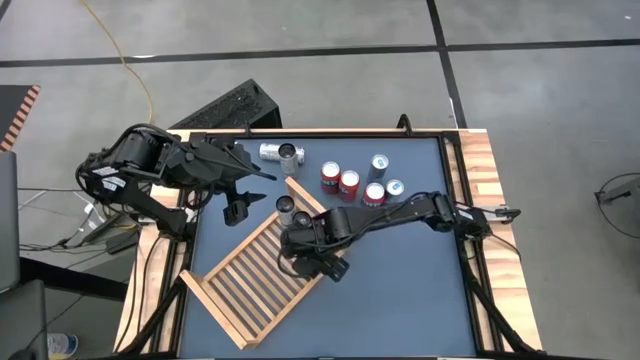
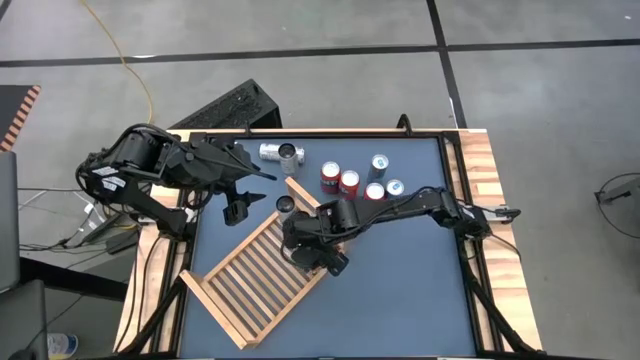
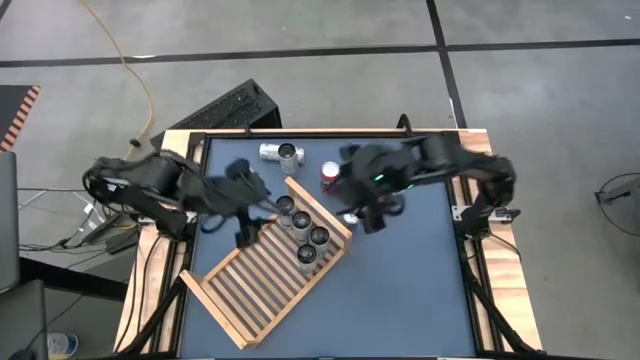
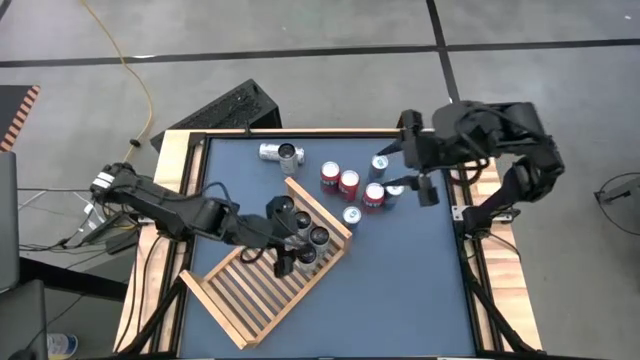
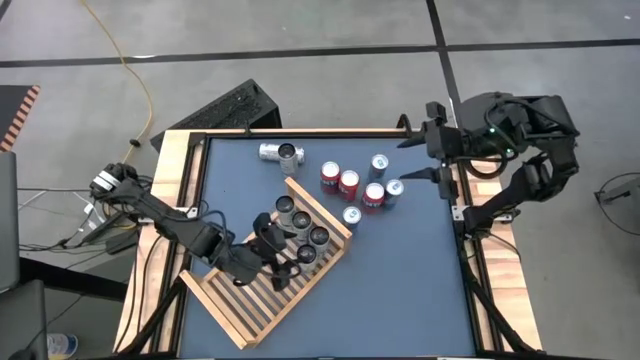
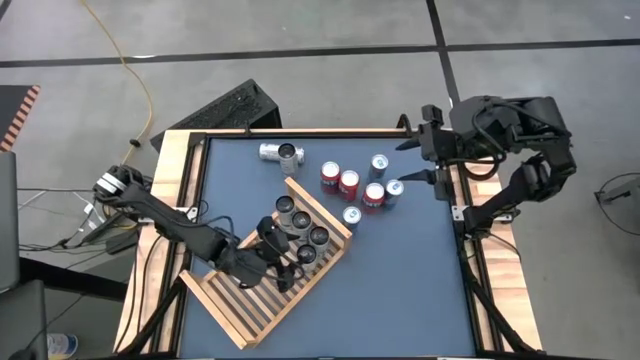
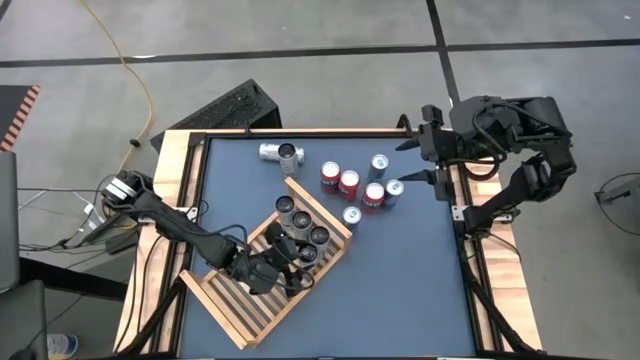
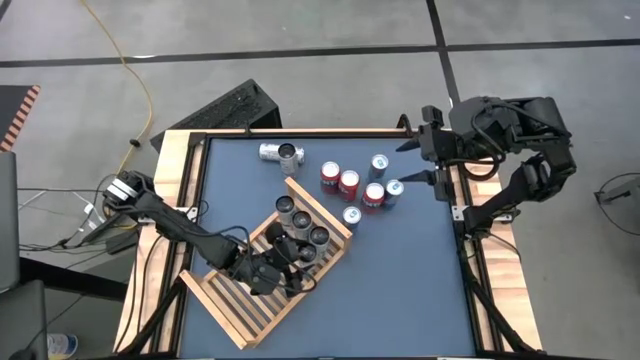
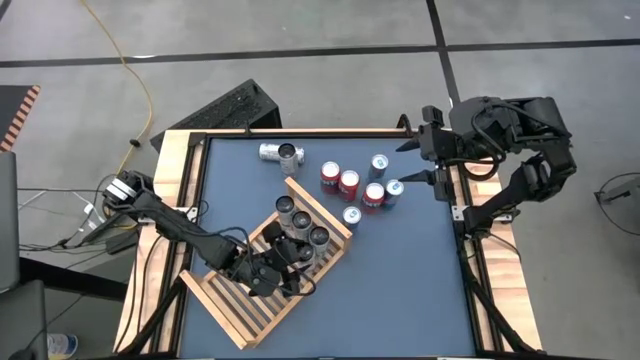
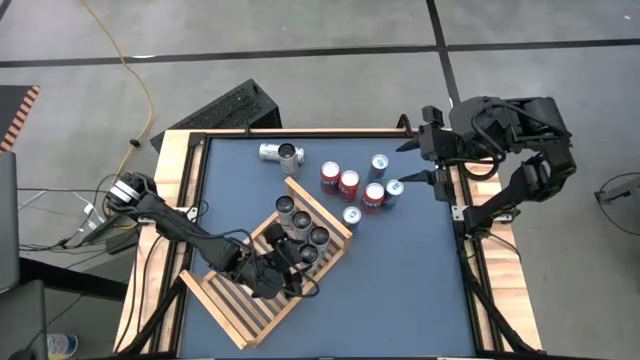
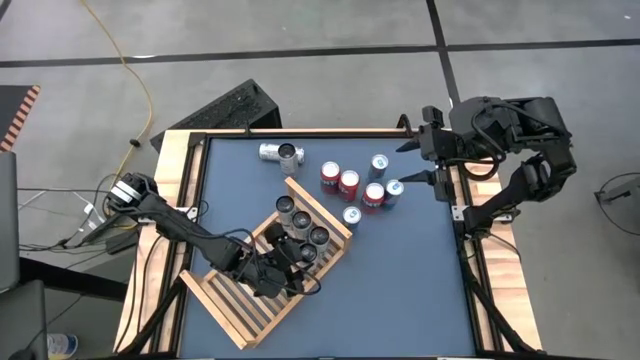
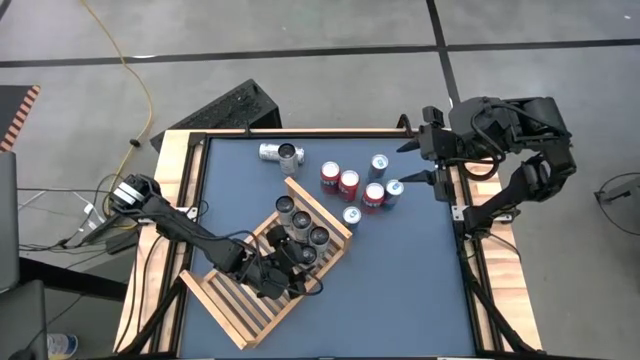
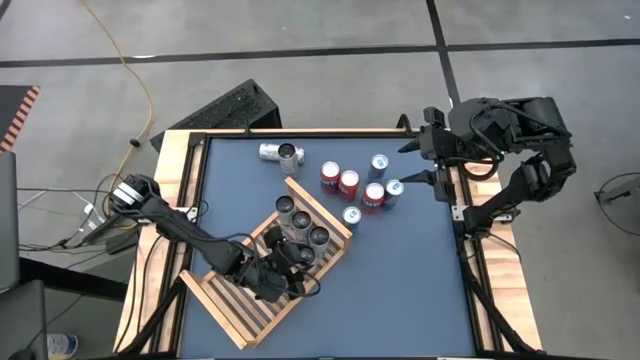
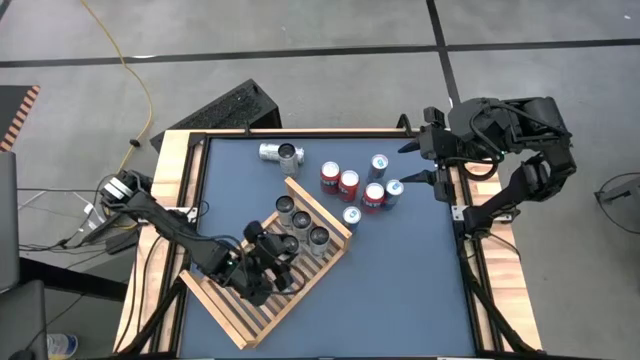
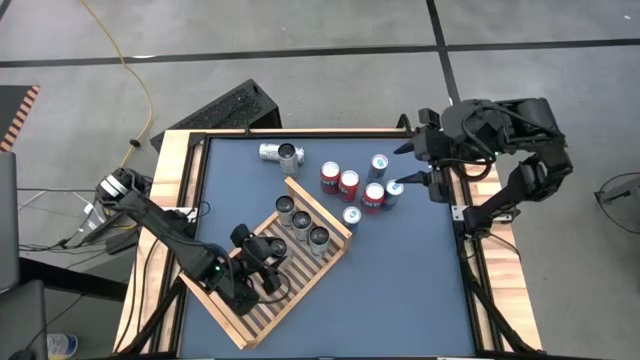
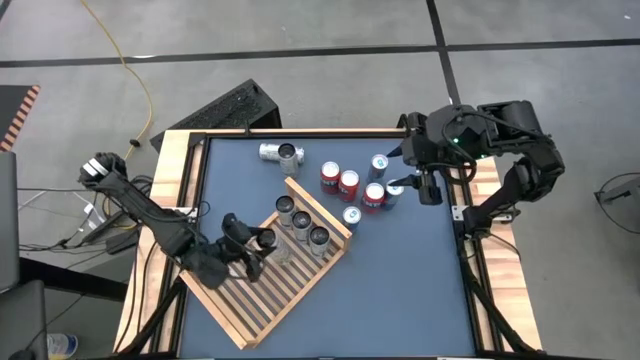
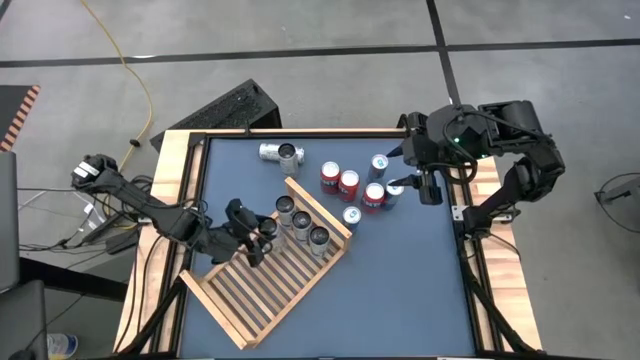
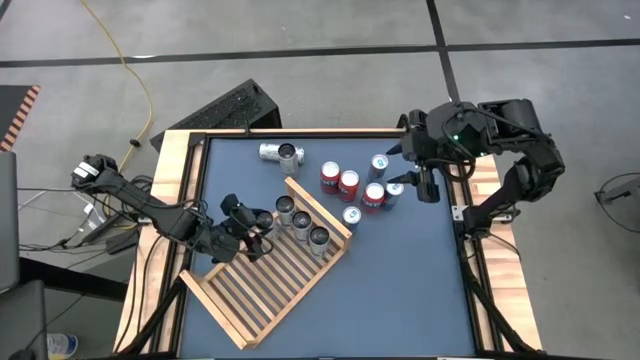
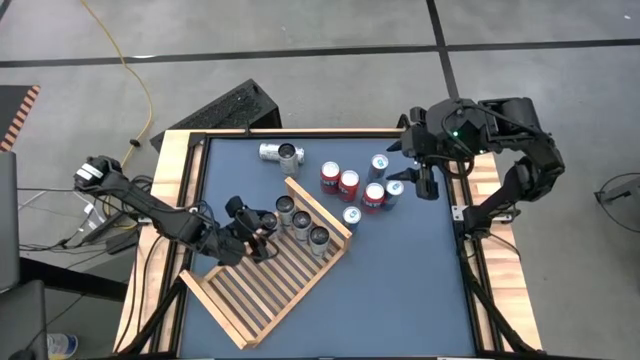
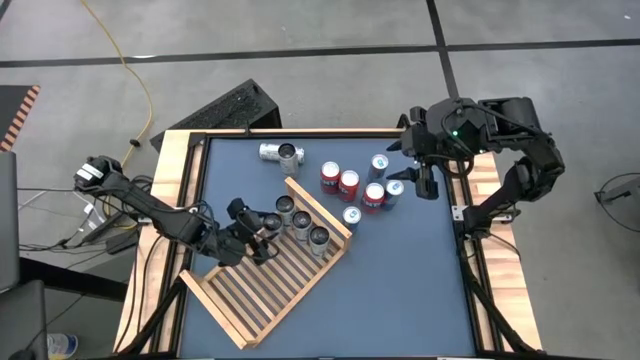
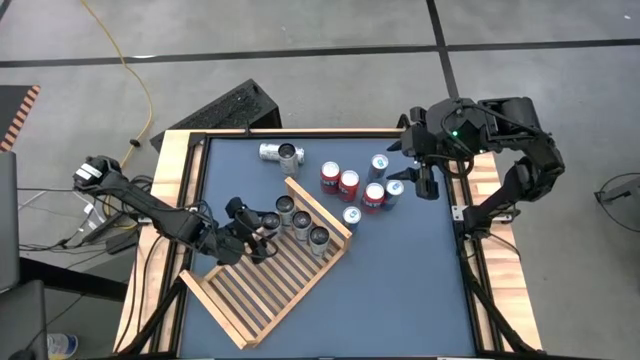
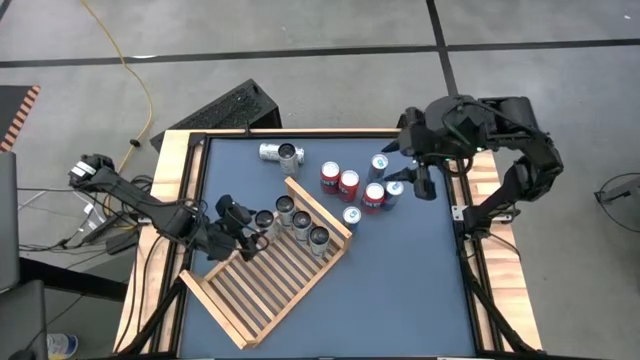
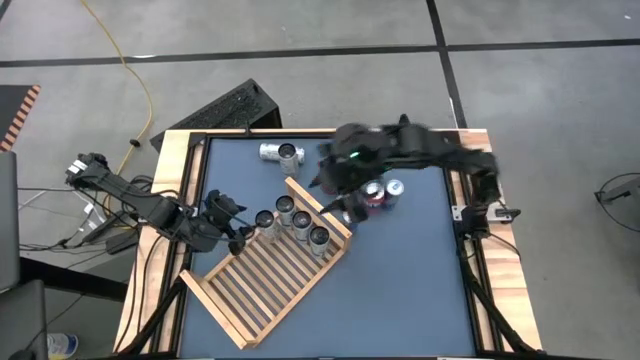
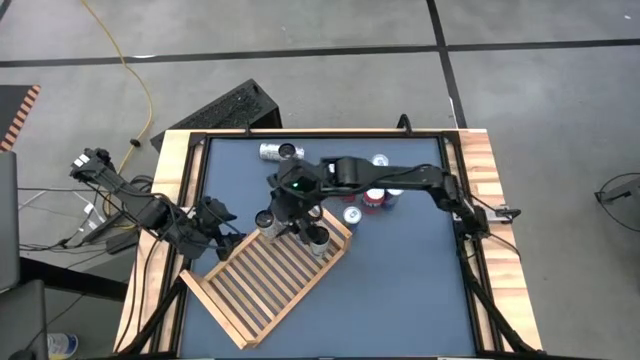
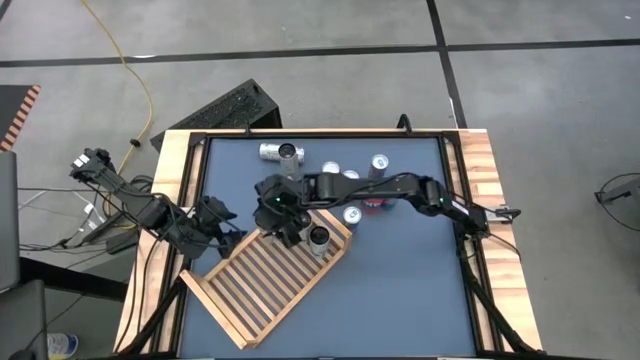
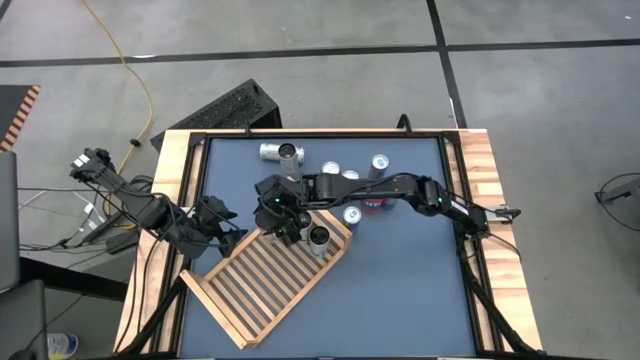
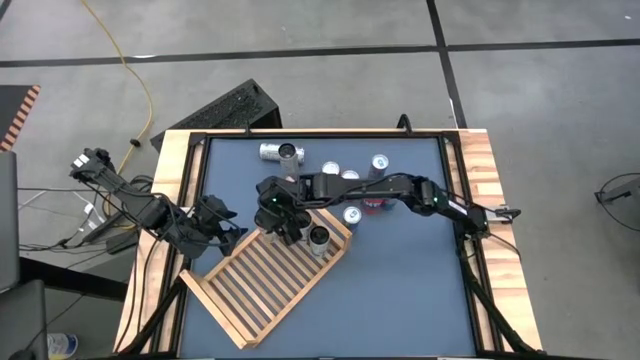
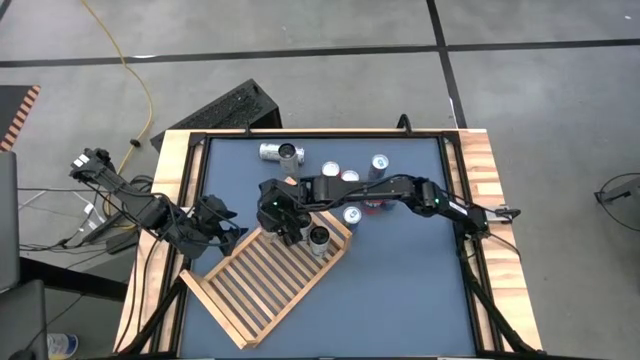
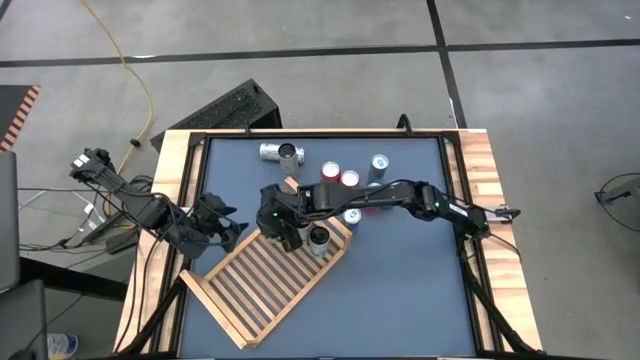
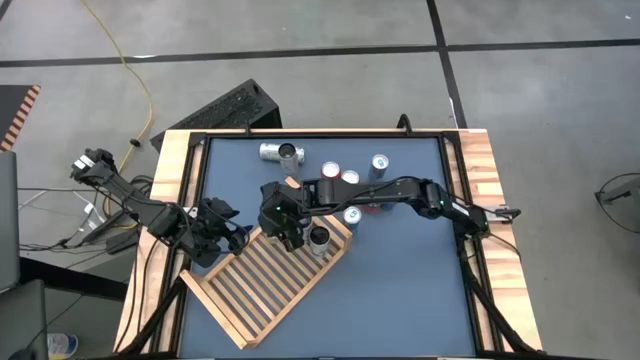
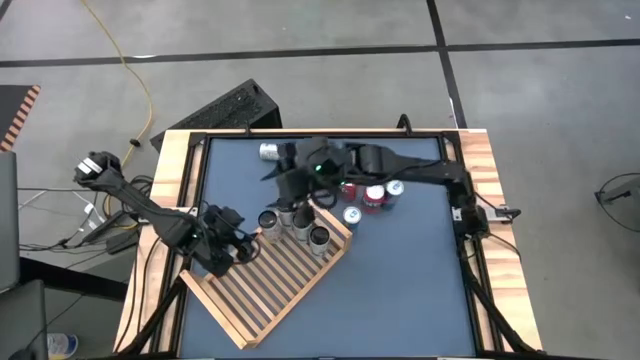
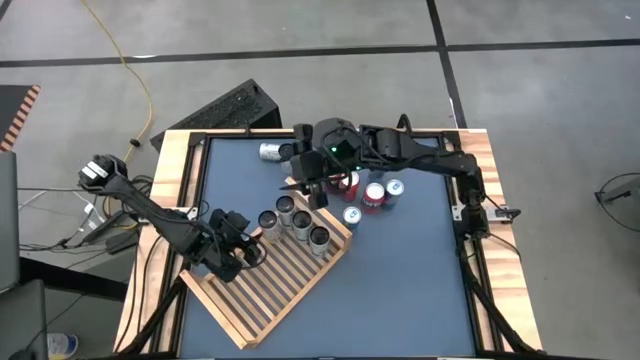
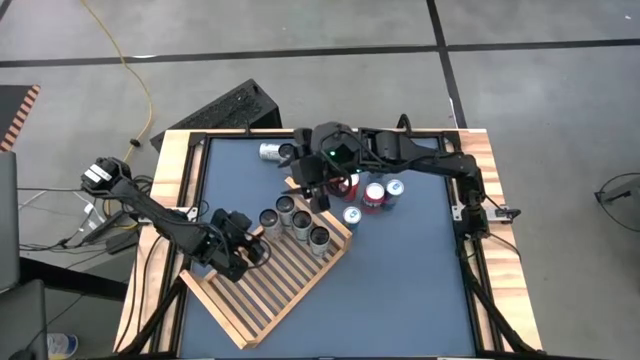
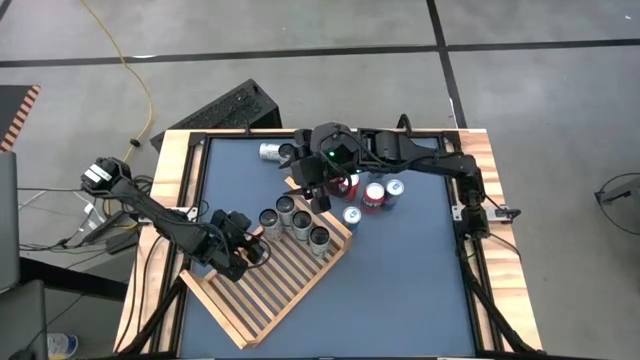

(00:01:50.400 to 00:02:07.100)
Task: Place canned beverage on shelf
Put the top right white yellow soda can on the shelf

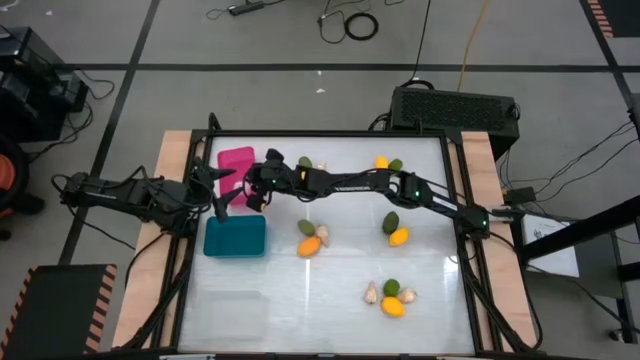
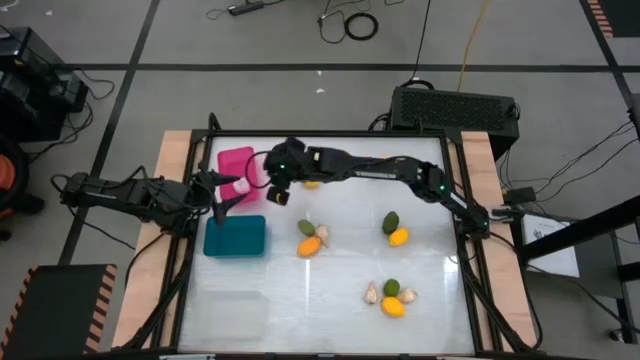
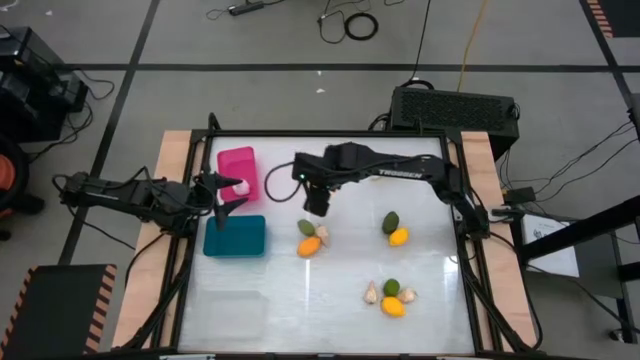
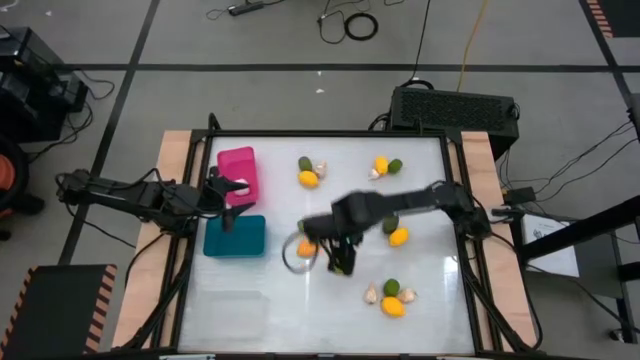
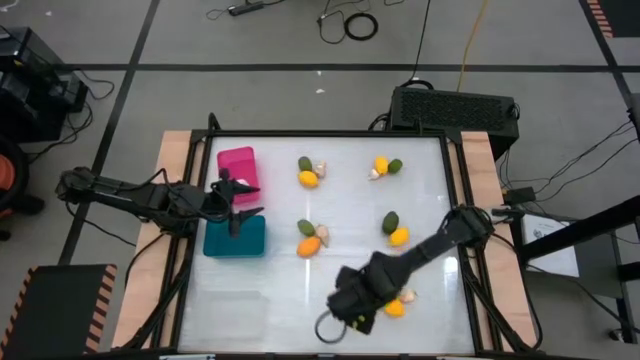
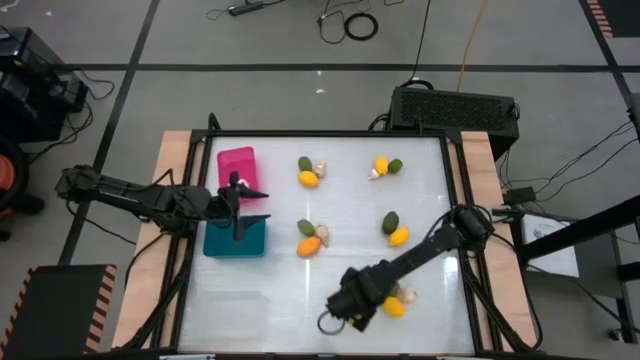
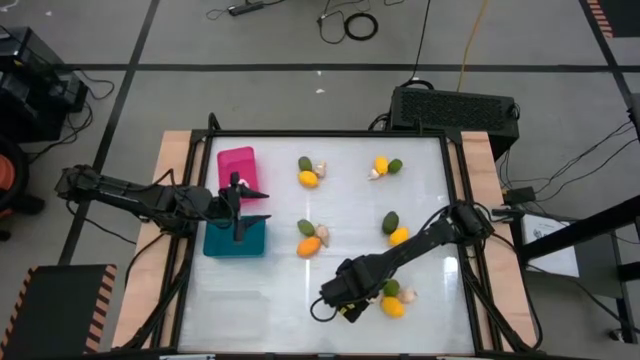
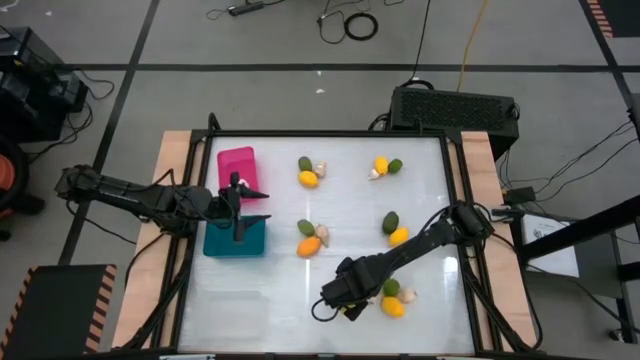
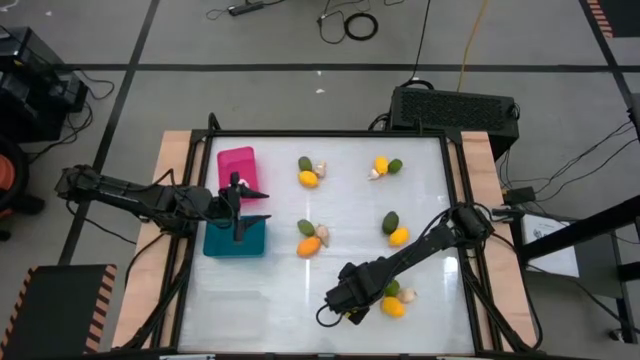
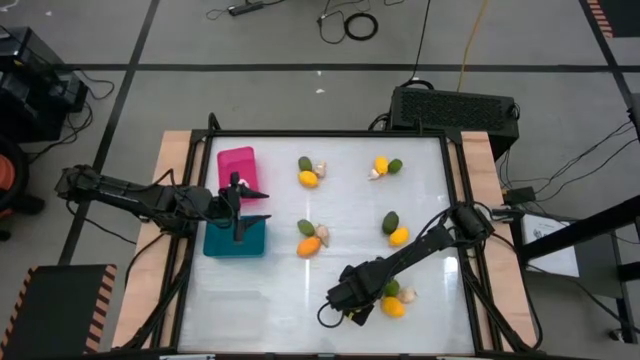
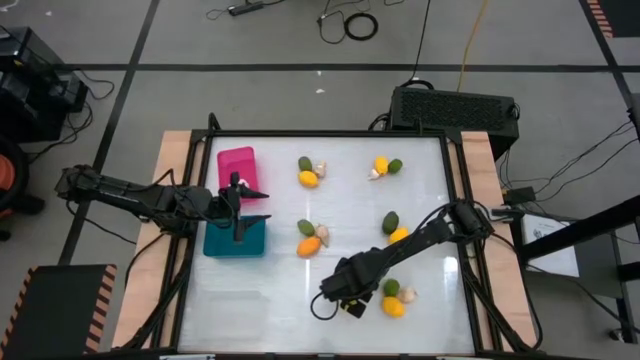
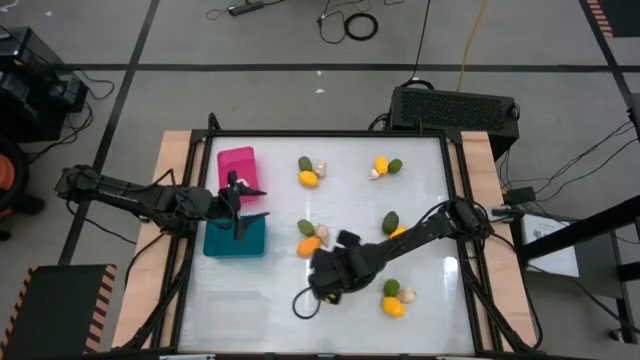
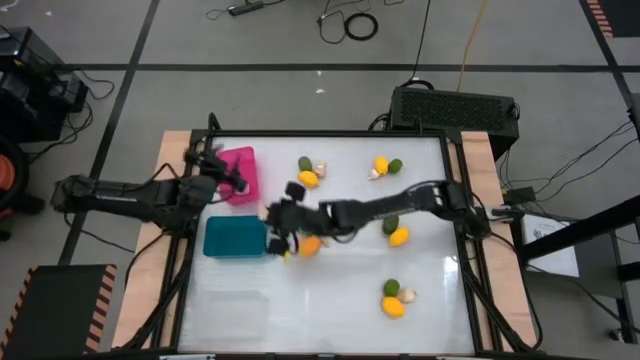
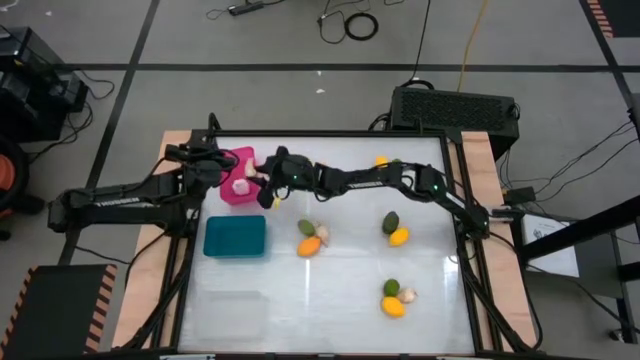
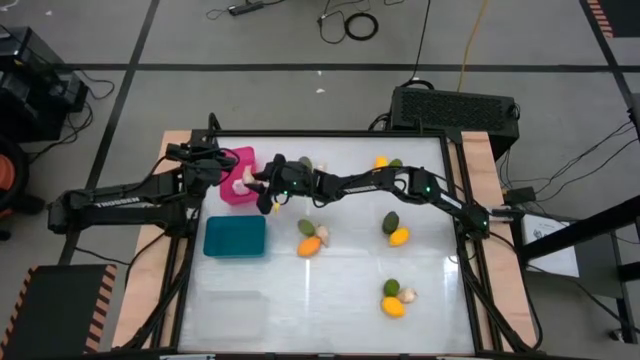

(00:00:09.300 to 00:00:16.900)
Task: Sort produce into baskets
Put the white garlic into the pink bin
